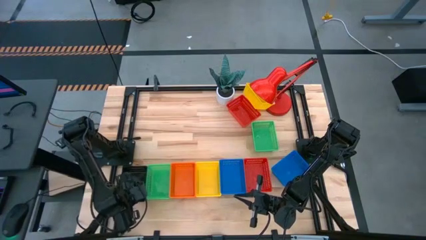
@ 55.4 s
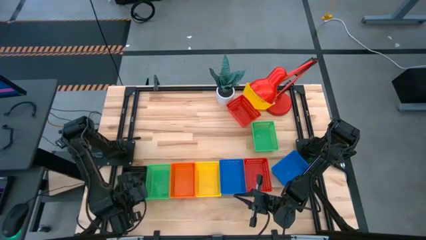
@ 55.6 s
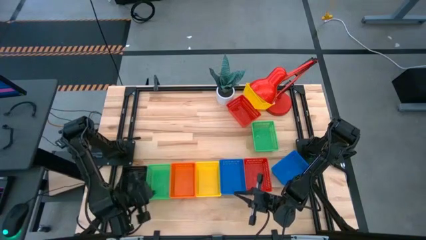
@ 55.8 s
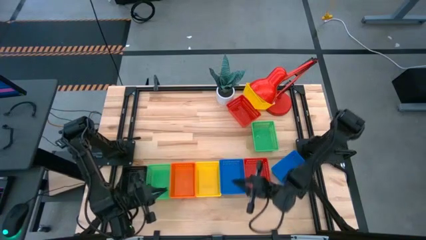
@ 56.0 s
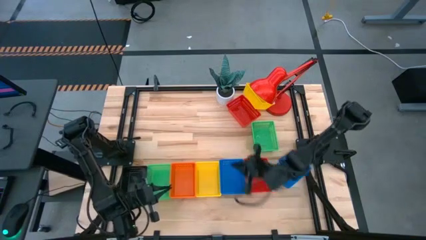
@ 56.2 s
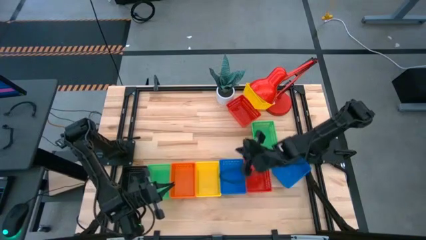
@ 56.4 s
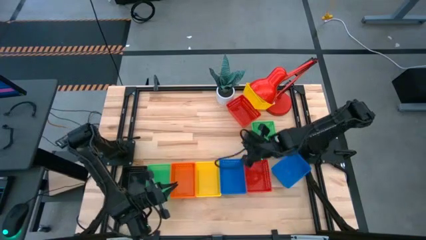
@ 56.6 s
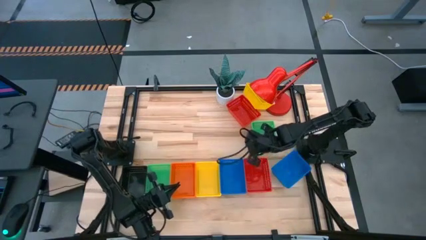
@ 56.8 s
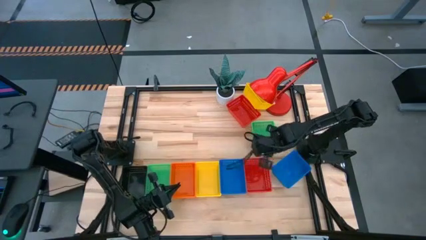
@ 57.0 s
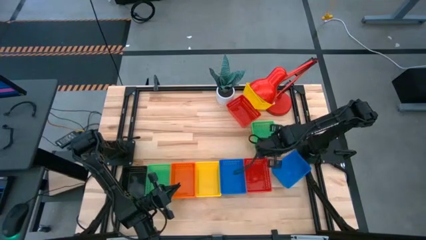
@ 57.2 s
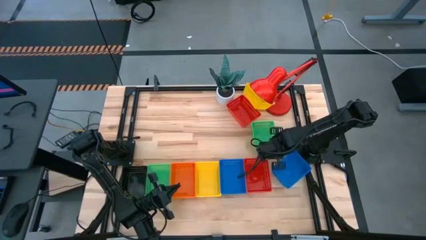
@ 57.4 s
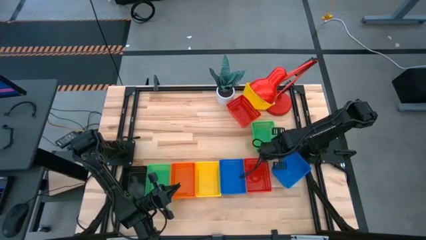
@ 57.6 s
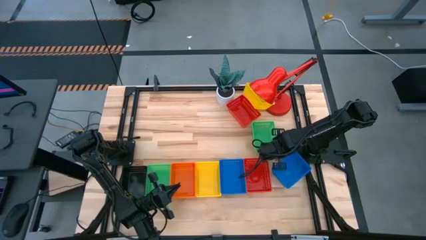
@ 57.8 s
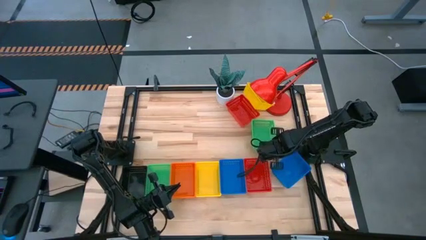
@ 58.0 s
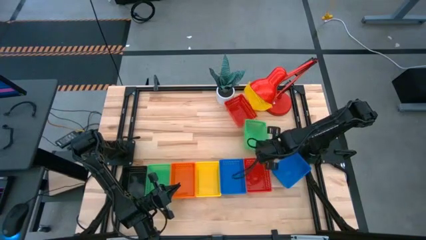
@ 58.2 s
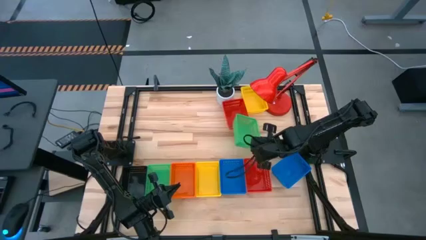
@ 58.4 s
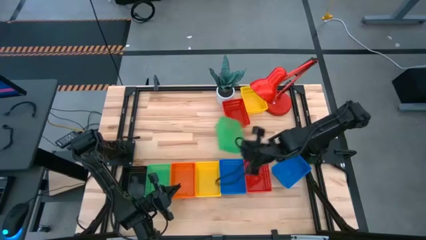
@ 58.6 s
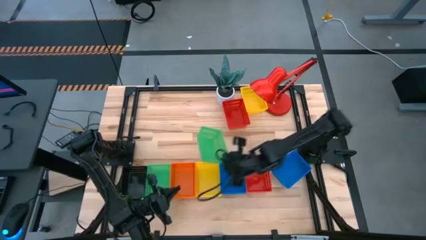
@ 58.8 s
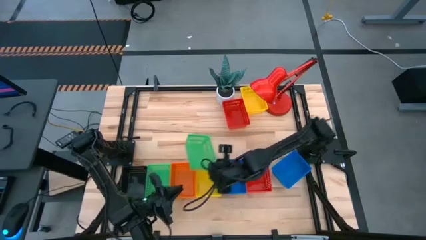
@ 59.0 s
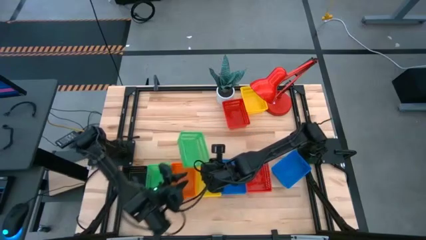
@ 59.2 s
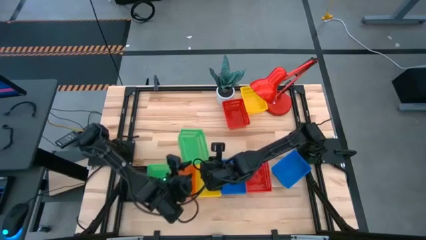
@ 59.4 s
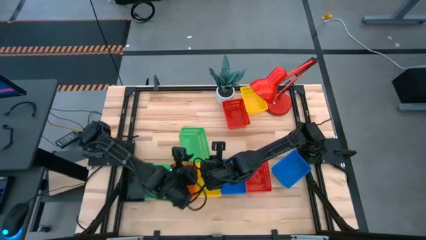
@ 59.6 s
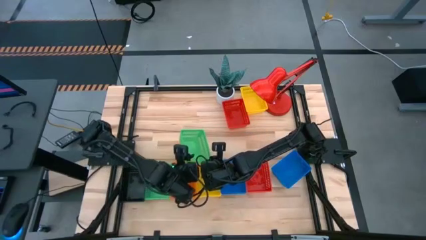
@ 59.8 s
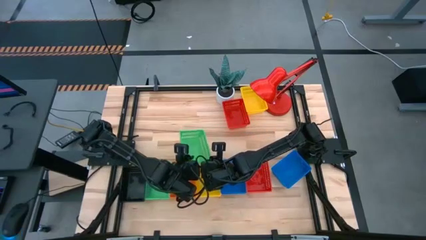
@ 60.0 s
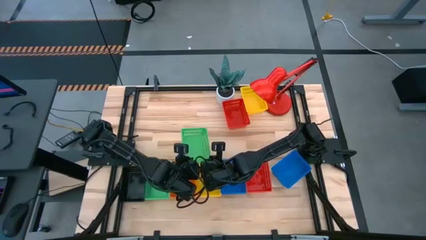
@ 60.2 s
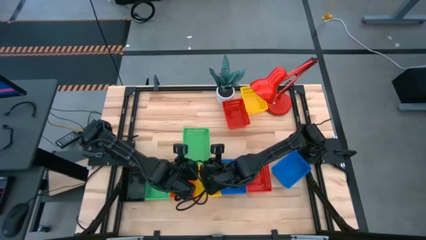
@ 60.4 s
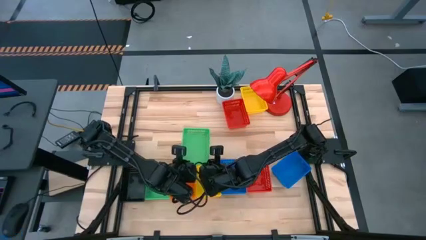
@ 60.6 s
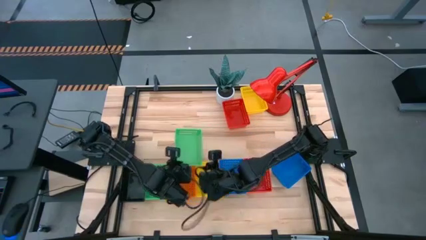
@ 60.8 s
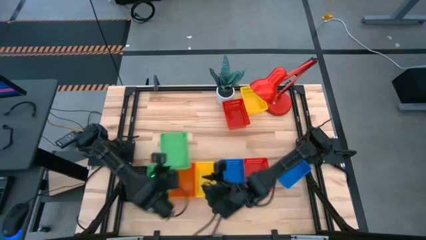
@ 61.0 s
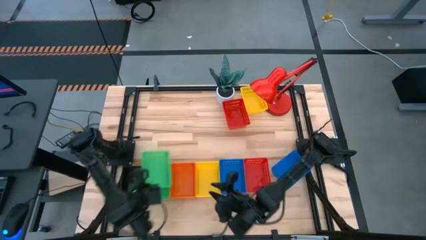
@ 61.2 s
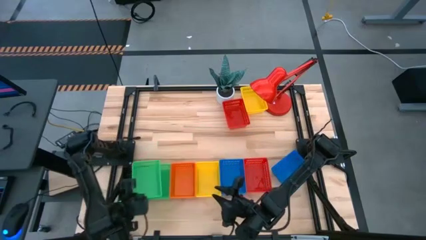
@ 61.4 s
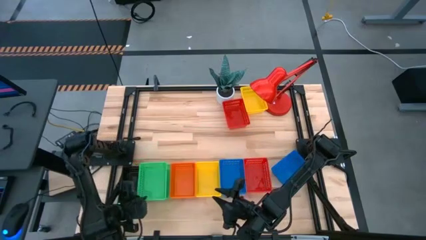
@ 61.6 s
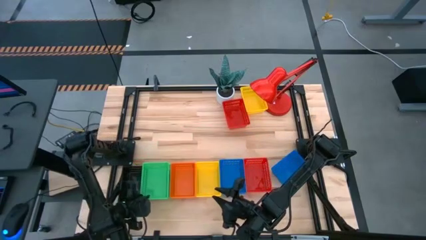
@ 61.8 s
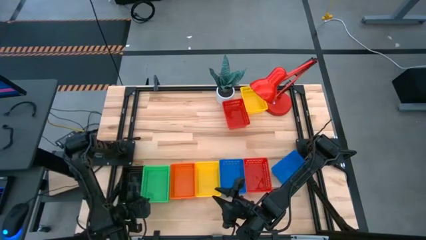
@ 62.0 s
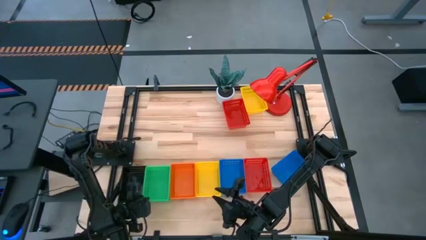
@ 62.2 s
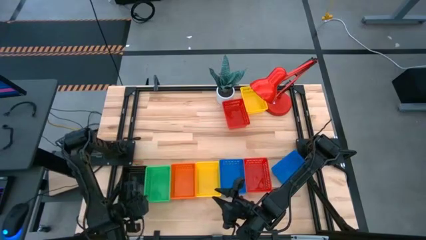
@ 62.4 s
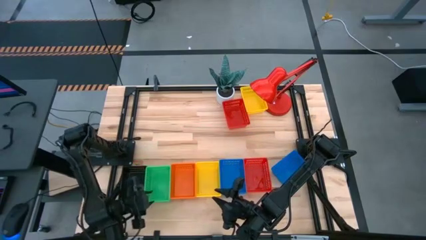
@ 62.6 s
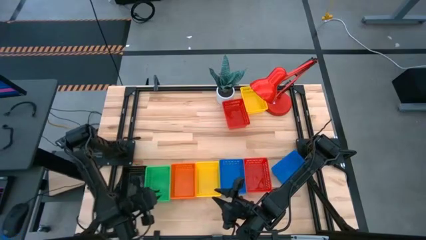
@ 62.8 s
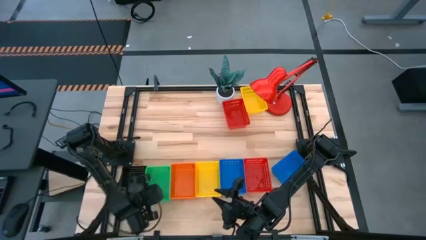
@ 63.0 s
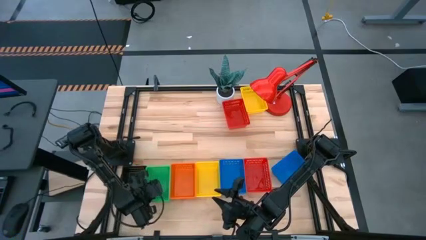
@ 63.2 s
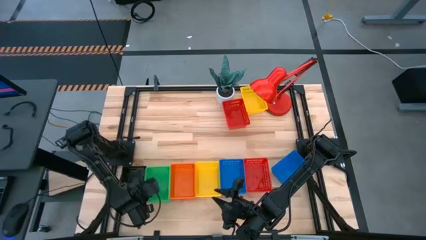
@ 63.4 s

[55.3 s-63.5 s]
Stack the right green bin on top of the left green bin

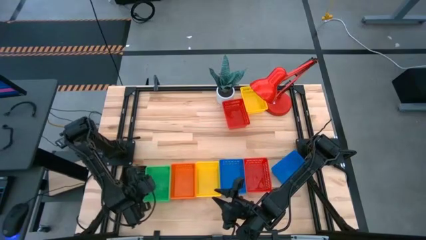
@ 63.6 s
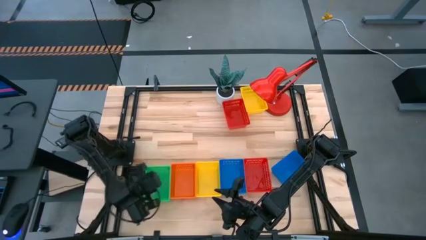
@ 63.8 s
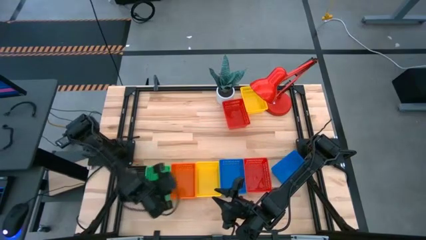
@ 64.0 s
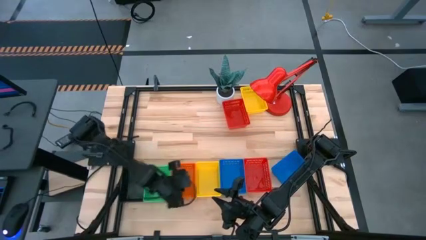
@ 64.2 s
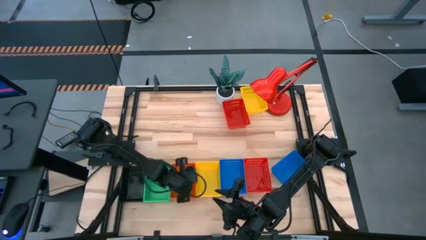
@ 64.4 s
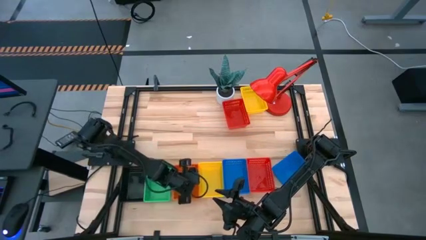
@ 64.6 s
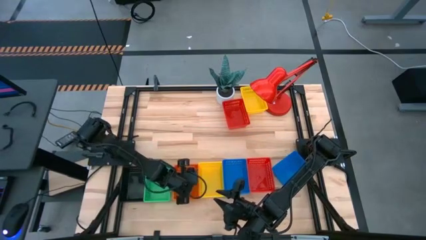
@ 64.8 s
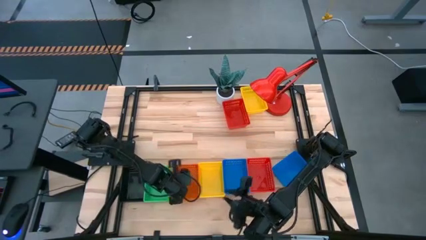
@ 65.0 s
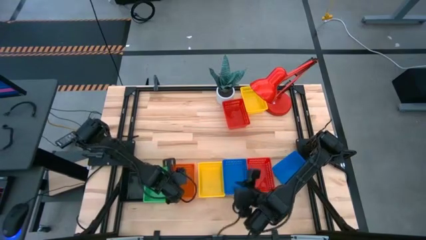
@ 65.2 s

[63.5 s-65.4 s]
Adjust the stacked orange bins

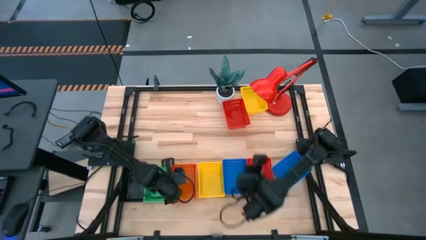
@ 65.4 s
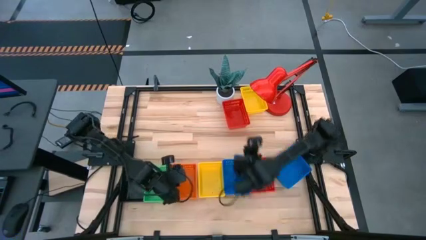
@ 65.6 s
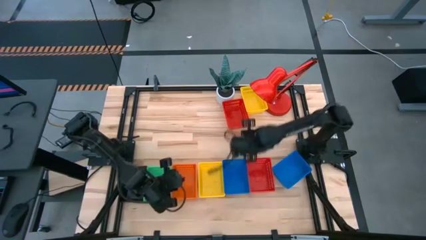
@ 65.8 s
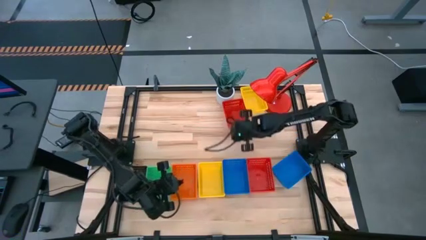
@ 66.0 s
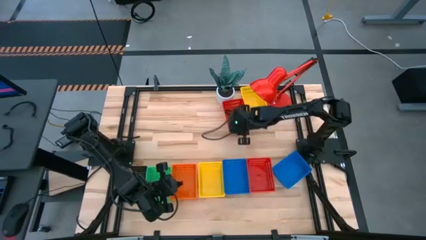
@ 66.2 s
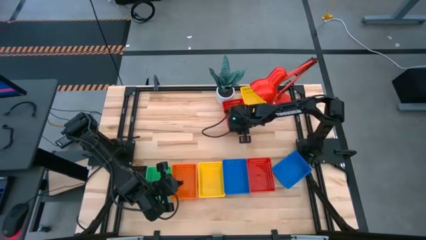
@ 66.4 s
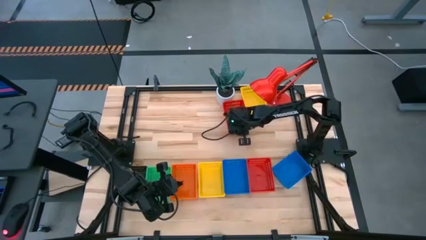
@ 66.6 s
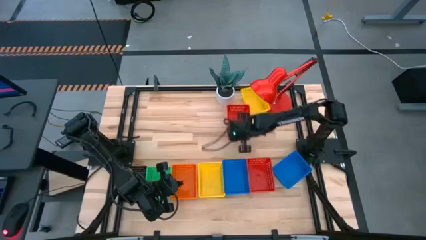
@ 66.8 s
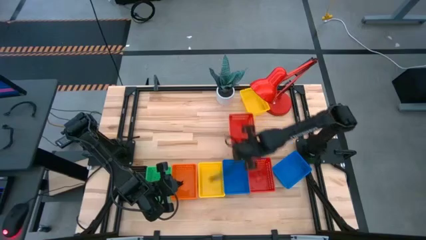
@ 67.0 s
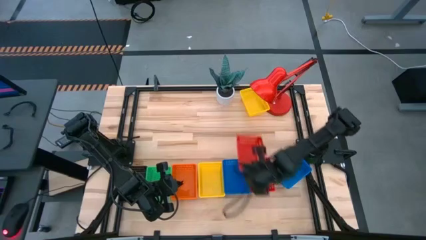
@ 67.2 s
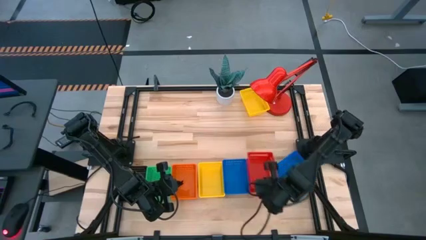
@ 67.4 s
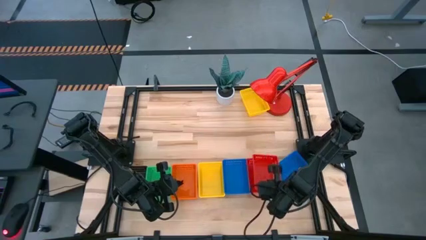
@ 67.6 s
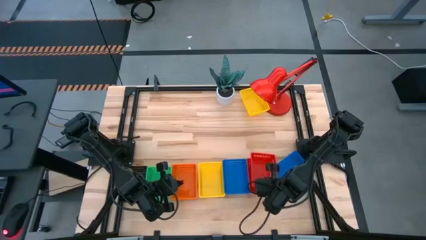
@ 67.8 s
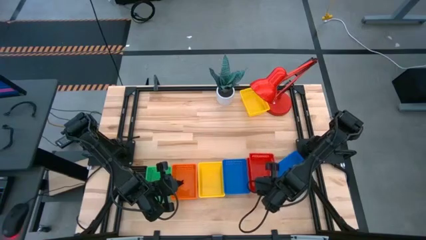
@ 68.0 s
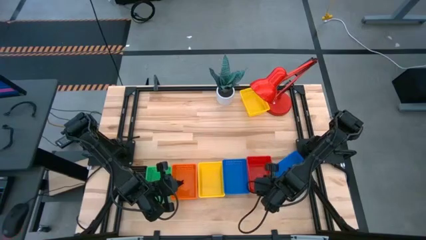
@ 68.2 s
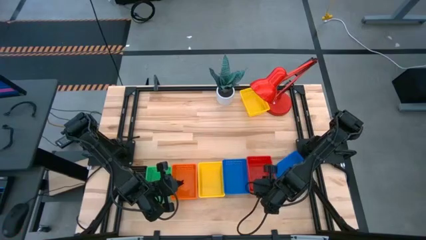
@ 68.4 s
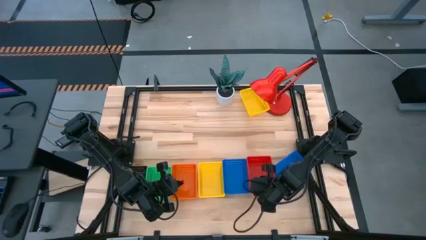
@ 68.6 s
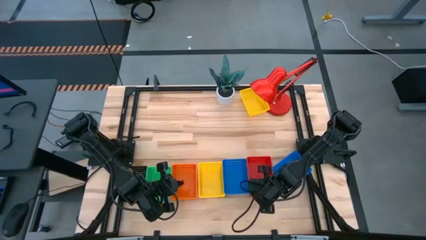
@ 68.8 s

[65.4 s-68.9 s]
Stack the top red bin on top of the bottom red bin

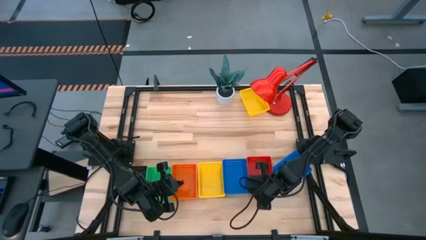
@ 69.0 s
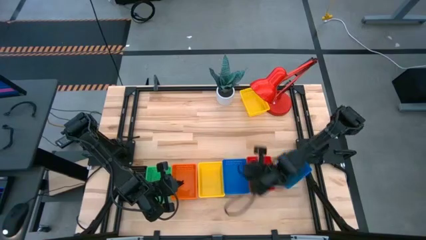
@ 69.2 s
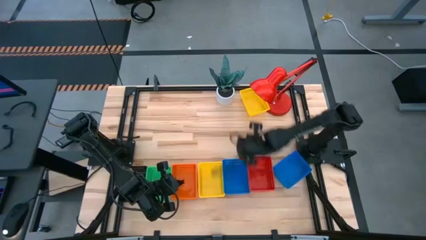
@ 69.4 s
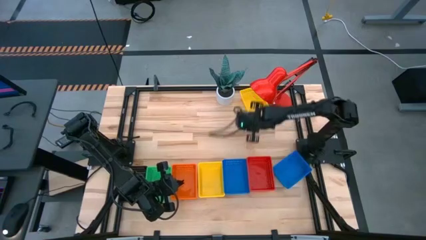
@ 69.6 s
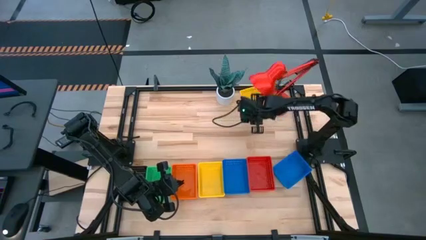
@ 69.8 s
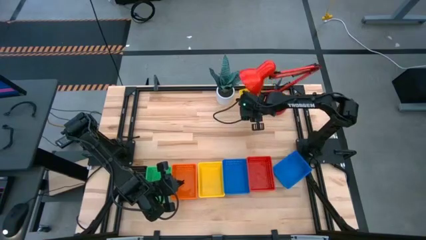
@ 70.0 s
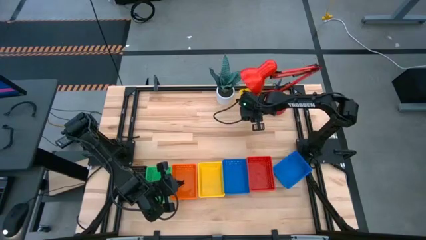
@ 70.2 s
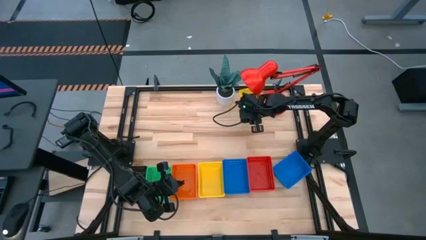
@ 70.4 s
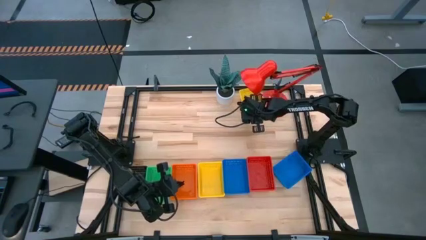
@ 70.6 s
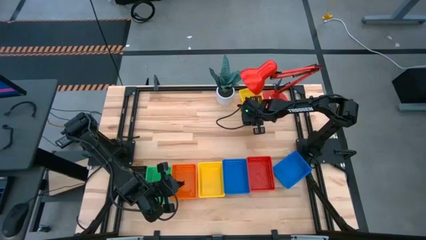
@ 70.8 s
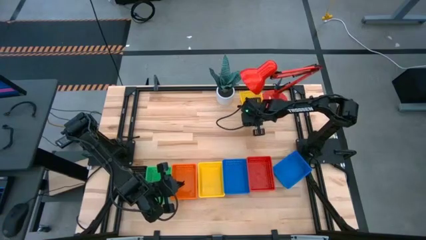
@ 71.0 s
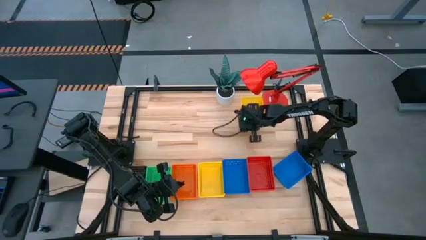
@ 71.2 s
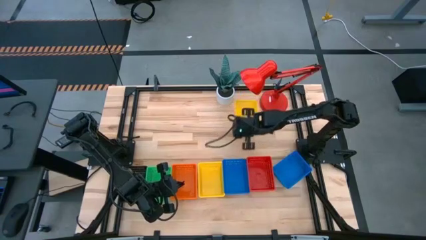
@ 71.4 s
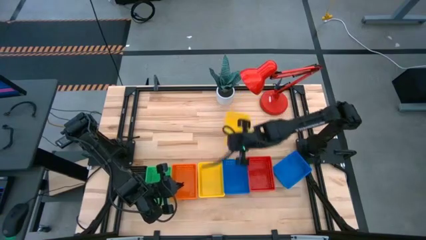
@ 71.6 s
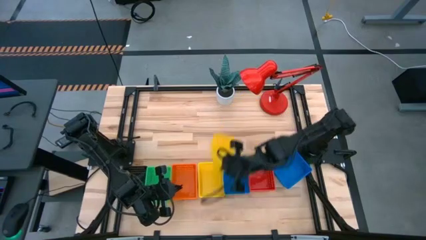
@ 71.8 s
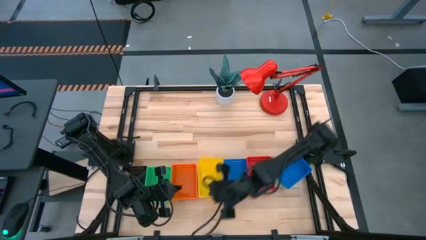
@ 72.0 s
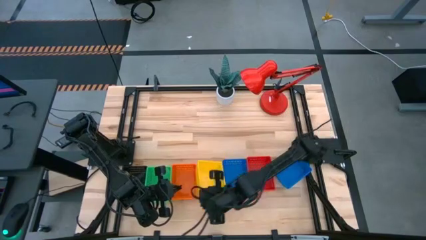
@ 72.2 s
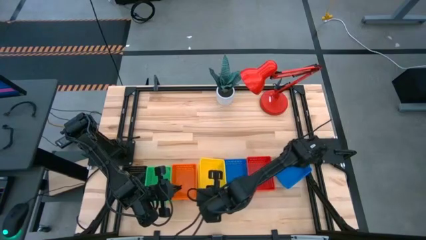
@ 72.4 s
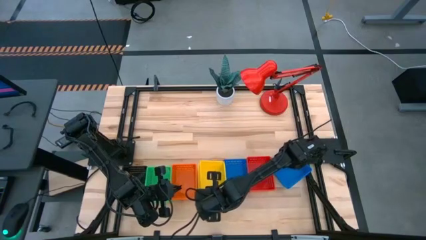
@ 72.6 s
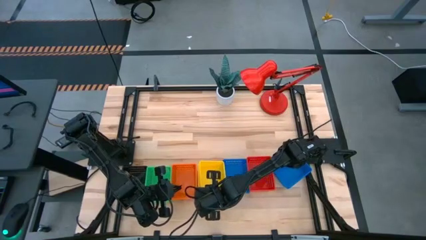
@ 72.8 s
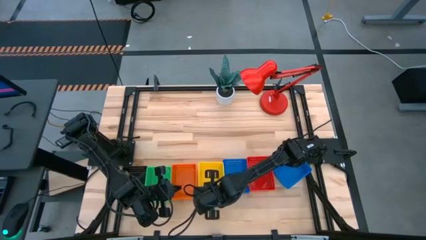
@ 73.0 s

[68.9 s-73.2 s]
Stack the top yellow bin on top of the bottom yellow bin
